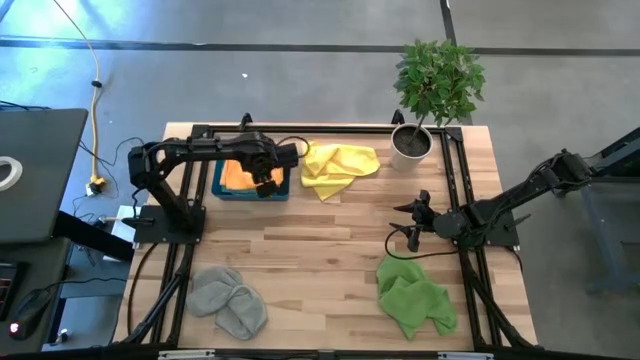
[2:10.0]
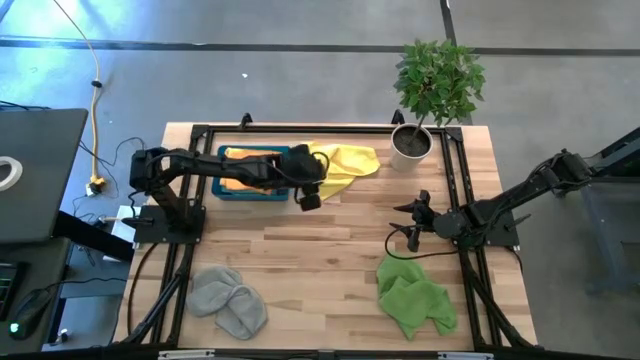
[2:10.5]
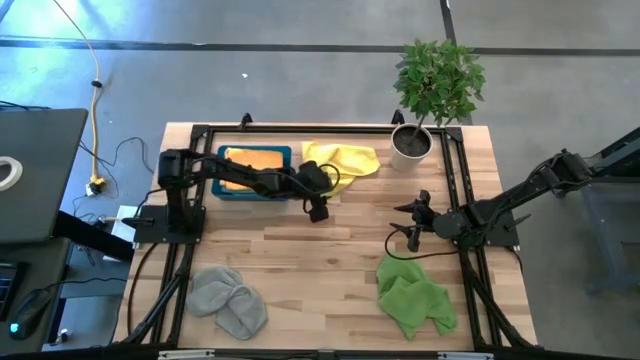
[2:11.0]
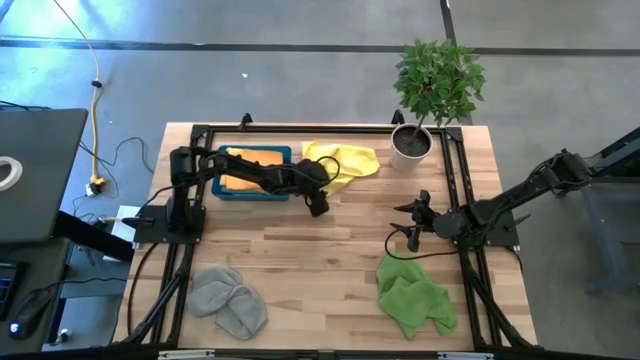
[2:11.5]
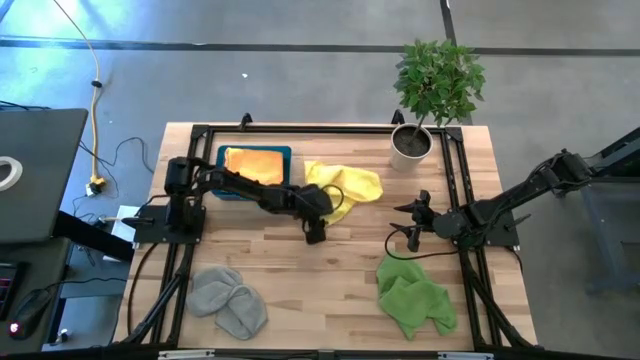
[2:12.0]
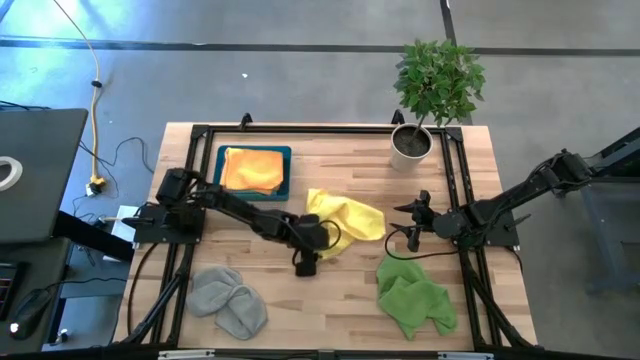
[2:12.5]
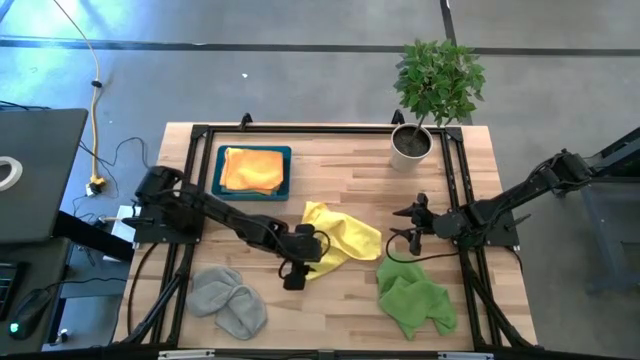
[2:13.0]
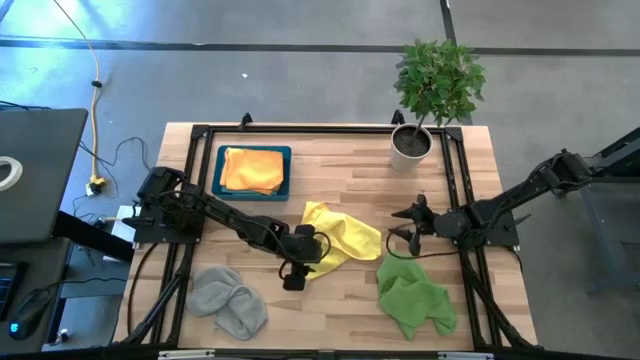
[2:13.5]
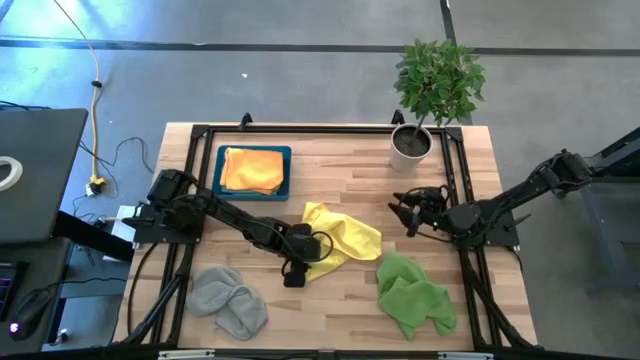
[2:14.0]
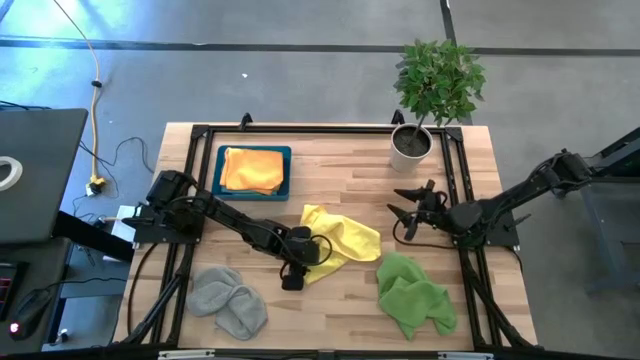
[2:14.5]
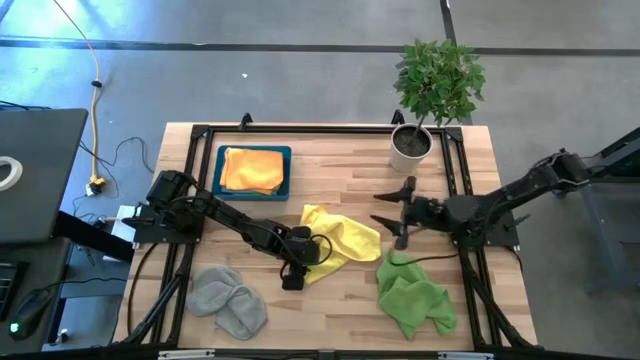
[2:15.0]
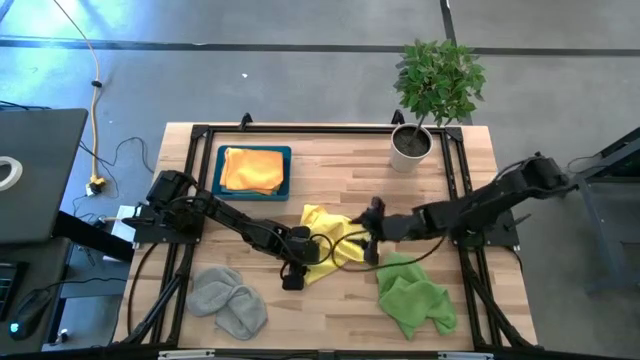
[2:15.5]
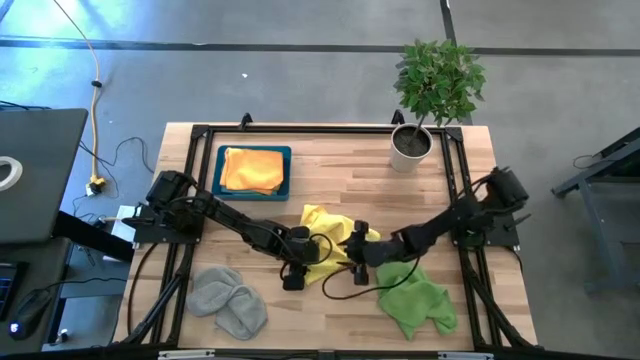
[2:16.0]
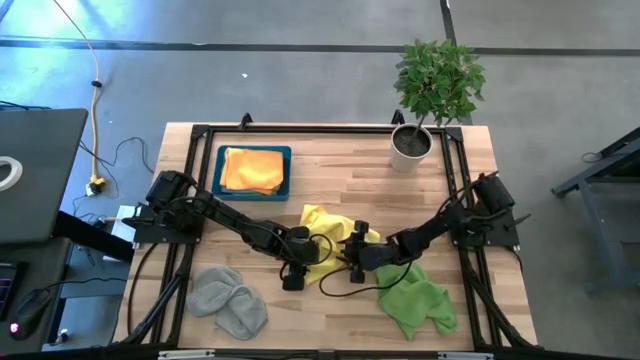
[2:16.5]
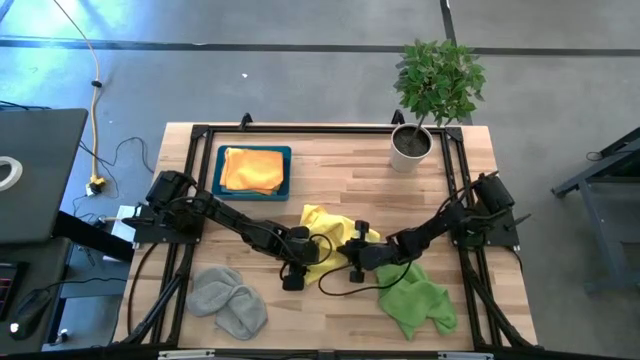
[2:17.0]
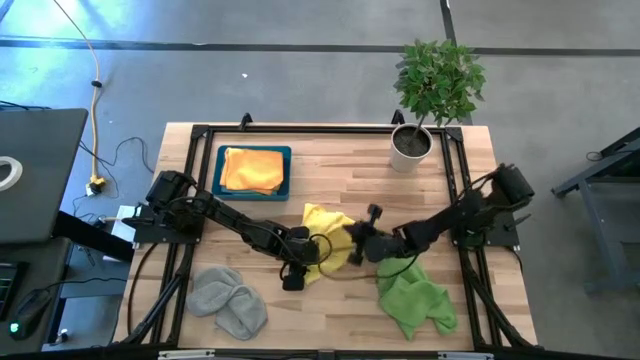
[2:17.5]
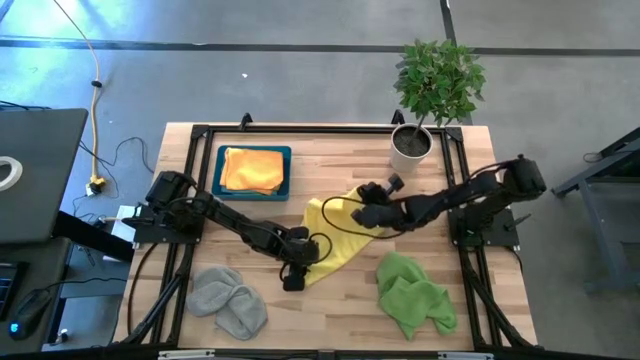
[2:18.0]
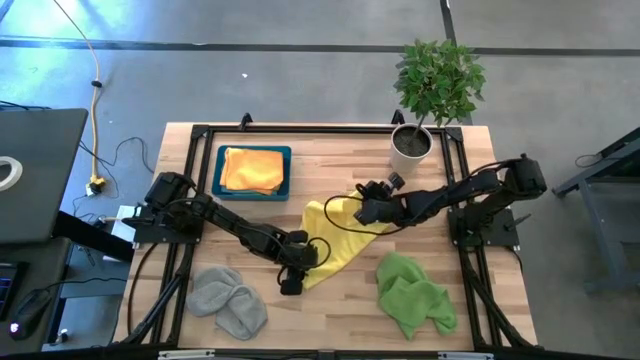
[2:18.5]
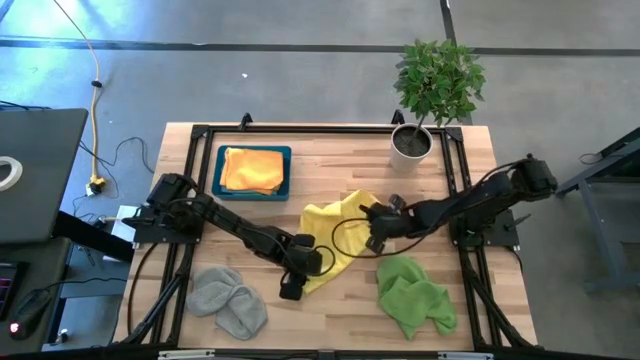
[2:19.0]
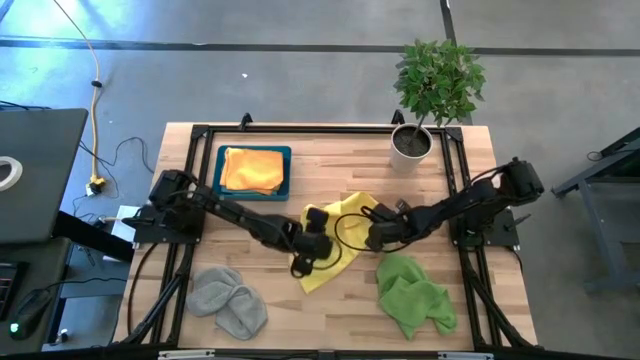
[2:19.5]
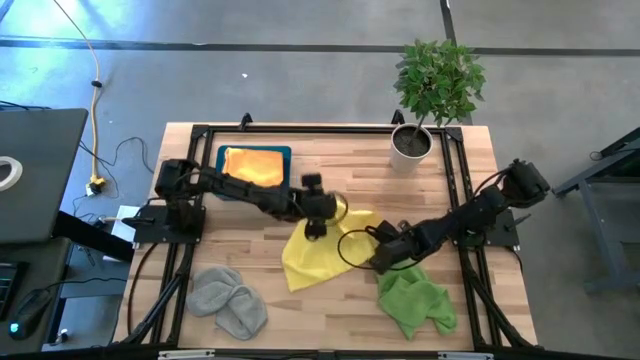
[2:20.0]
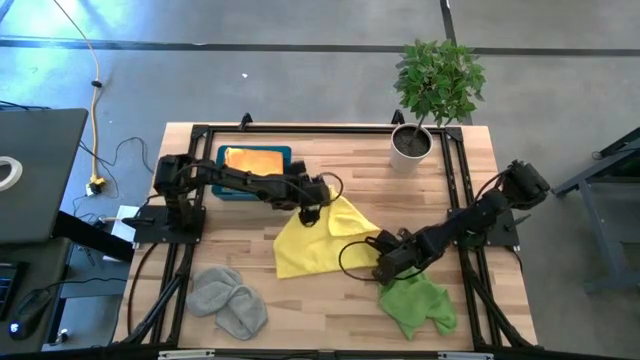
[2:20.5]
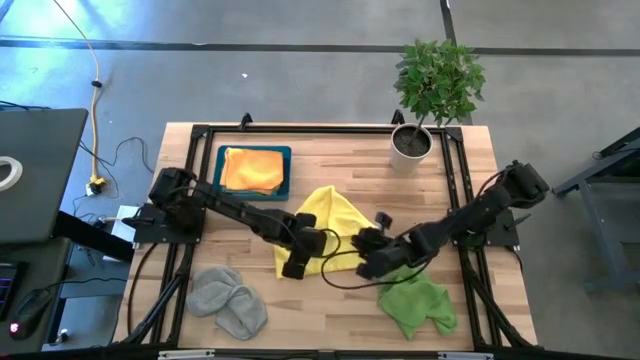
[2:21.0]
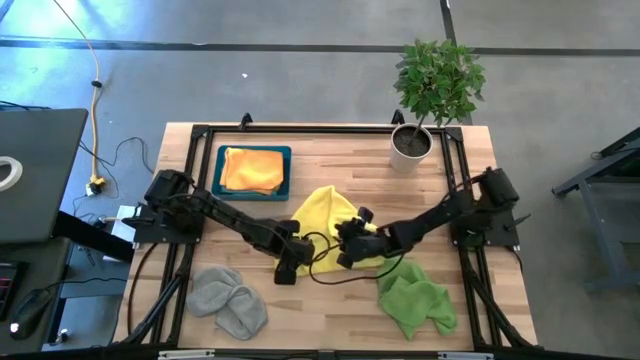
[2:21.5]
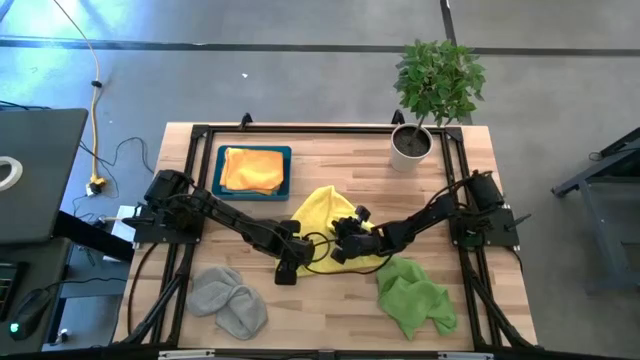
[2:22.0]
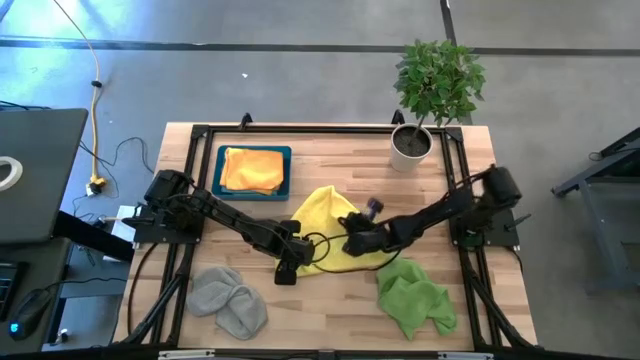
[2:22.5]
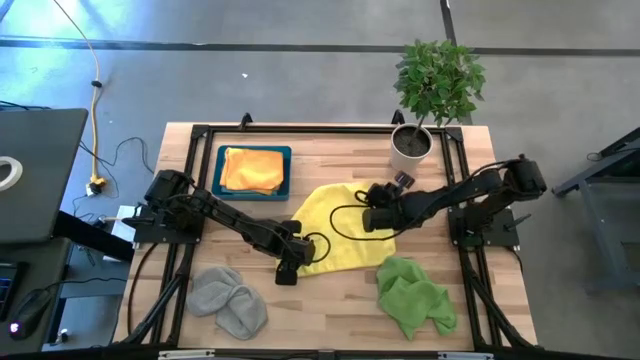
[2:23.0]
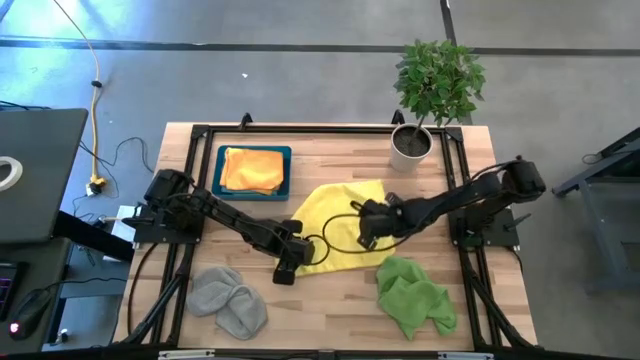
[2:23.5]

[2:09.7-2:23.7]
Task: Fold microfiber towels
Fold the yellow microfiber cloth

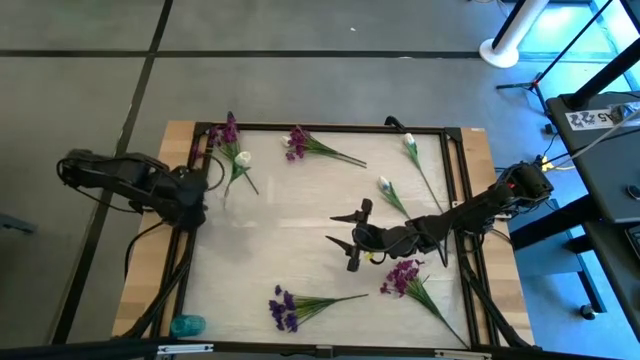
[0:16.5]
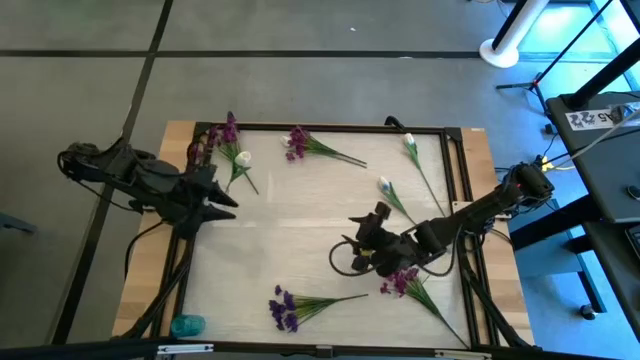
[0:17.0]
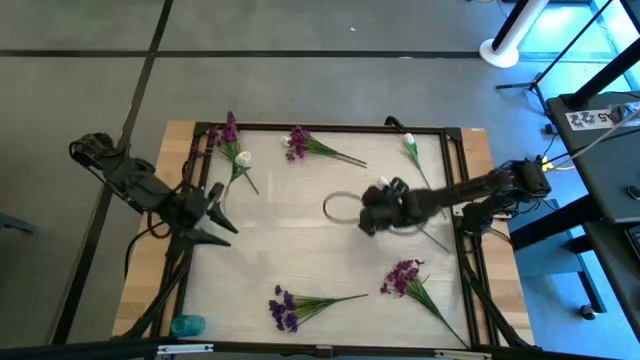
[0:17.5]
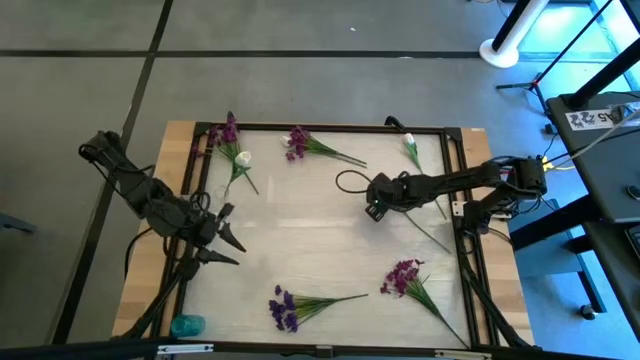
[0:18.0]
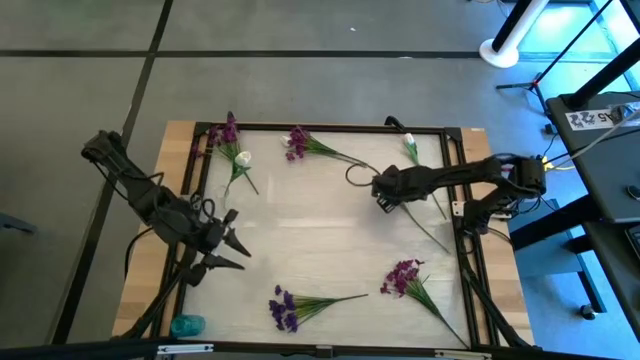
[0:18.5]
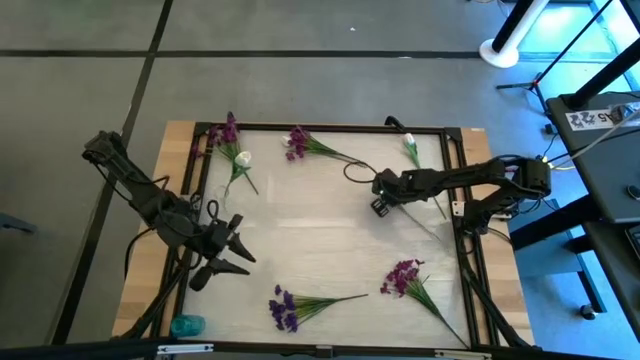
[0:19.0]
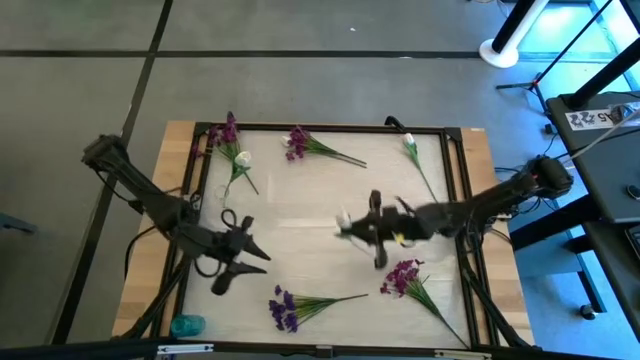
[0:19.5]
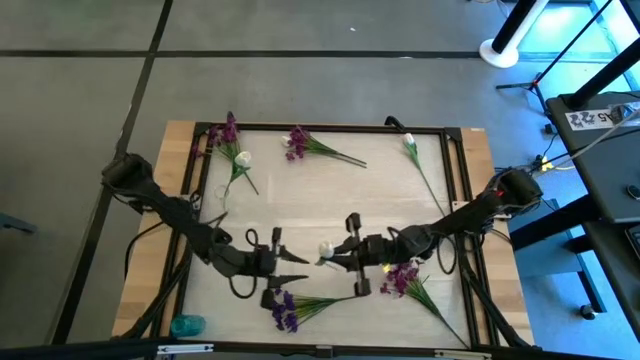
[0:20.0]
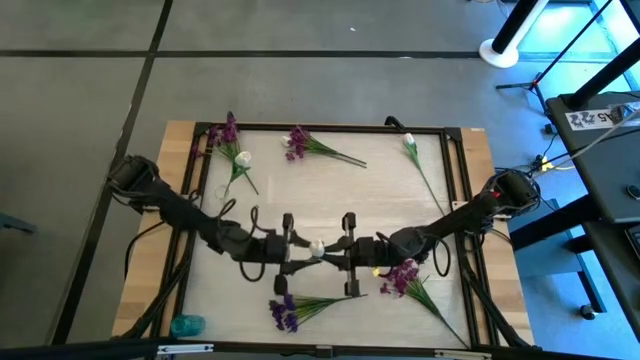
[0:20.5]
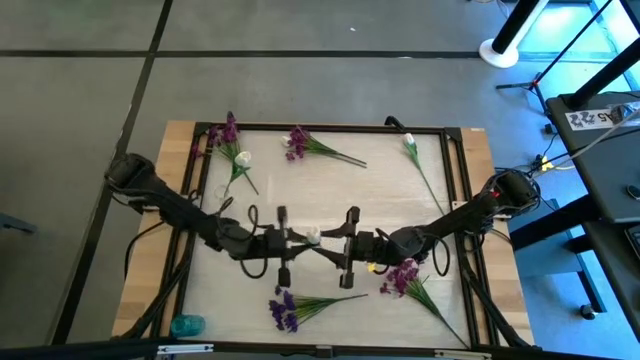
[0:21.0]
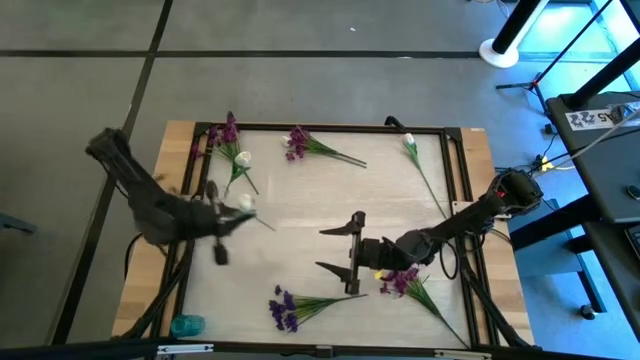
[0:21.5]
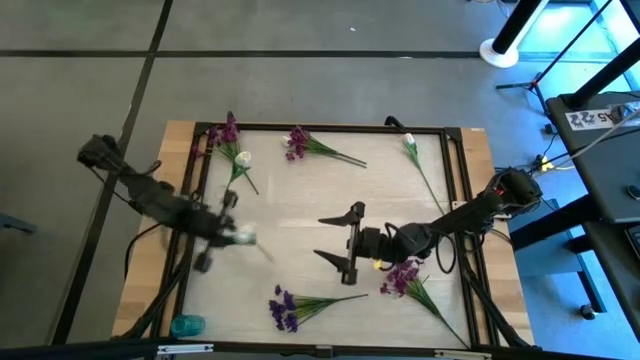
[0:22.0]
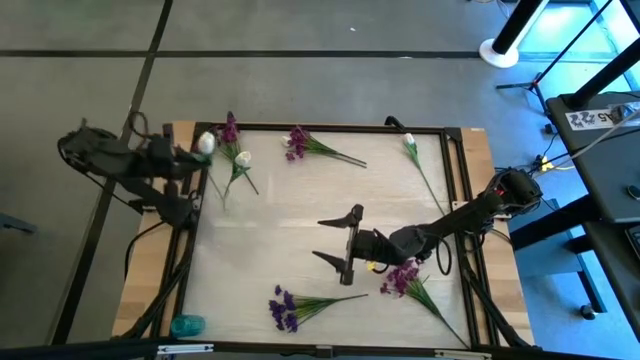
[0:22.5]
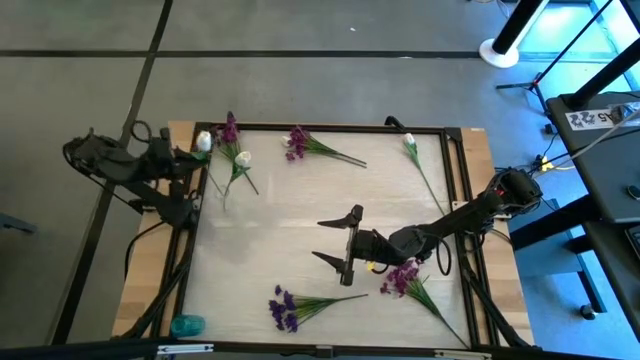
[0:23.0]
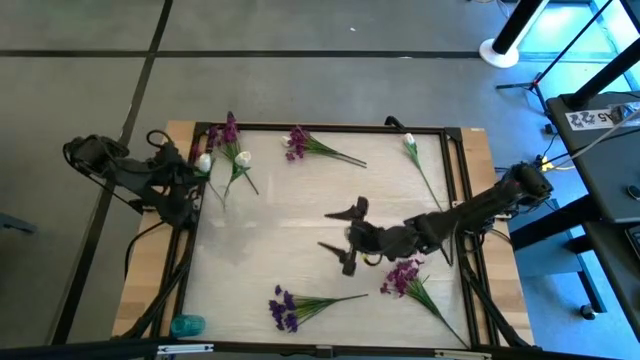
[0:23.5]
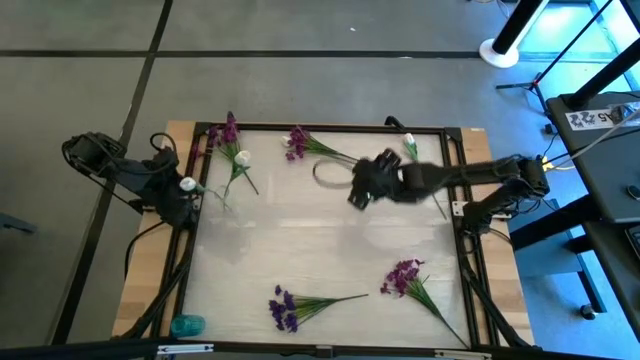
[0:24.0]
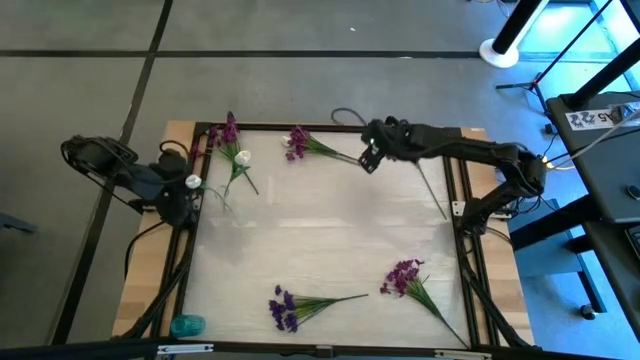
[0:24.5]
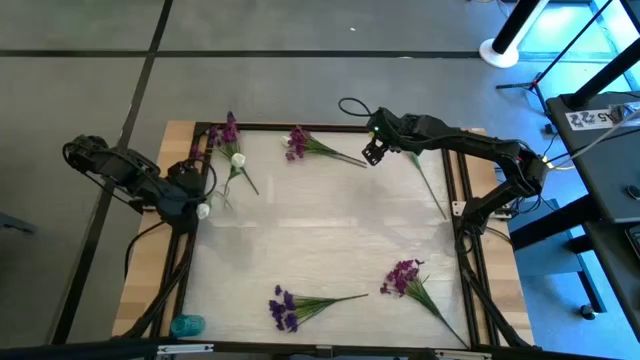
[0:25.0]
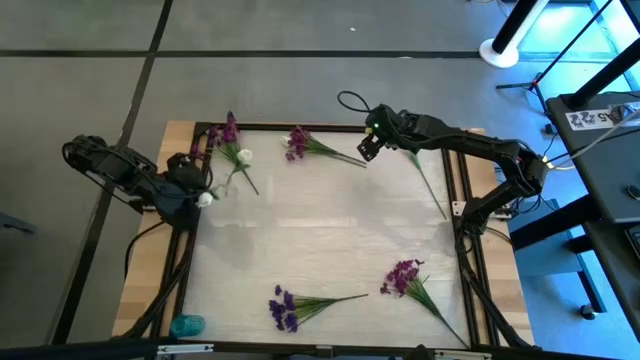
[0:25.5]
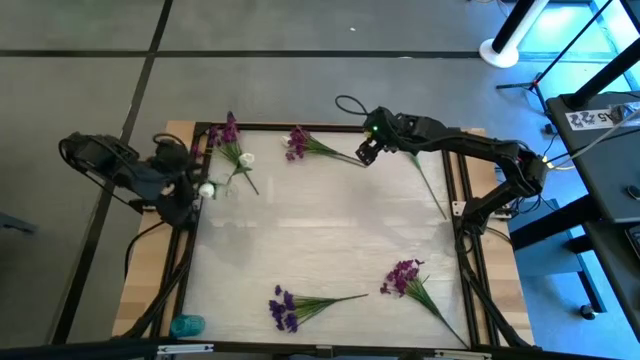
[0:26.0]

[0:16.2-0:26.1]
Task: Sort flowers into vase by color
Put the white flower into the transparent vase
